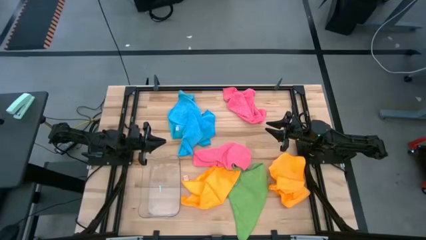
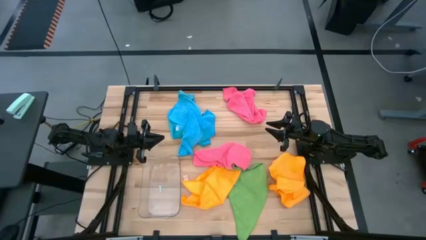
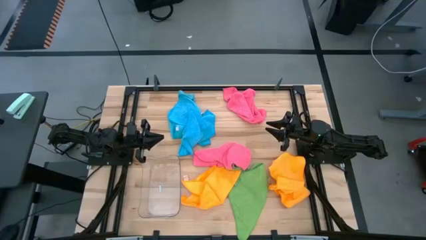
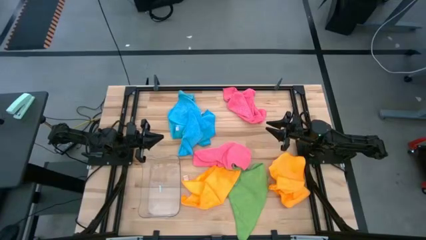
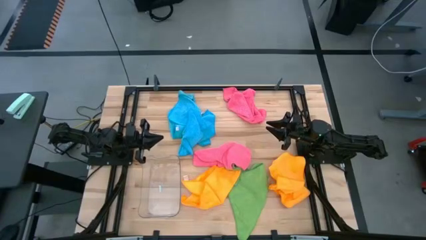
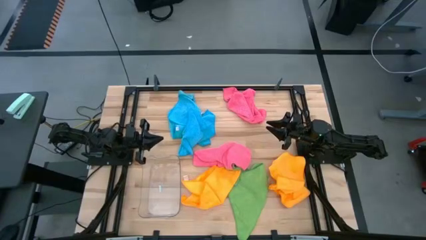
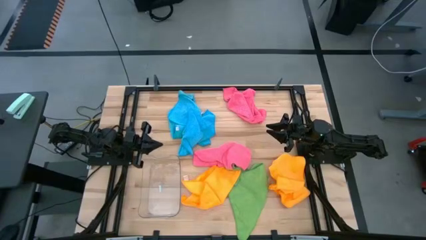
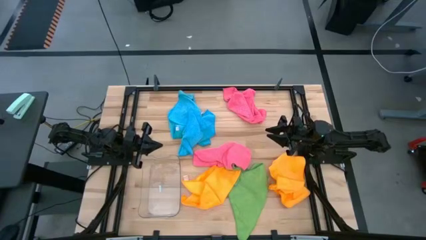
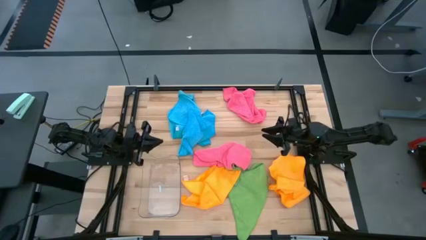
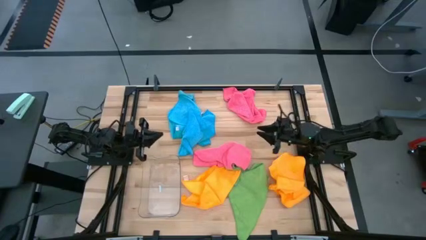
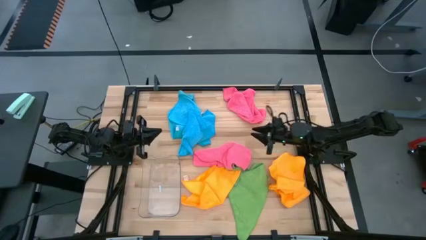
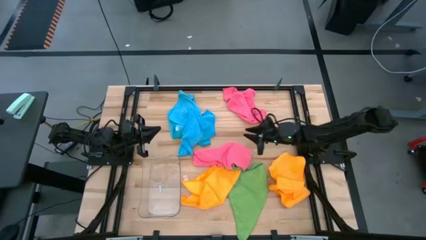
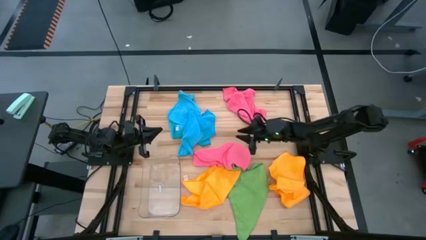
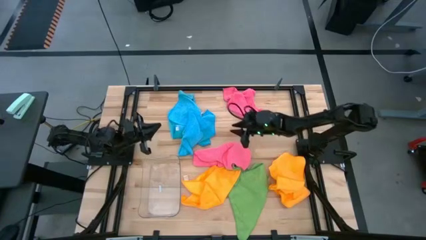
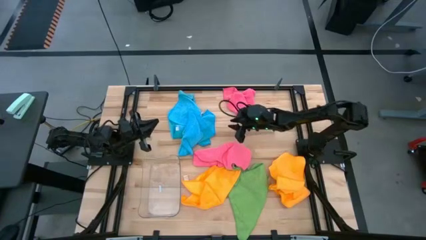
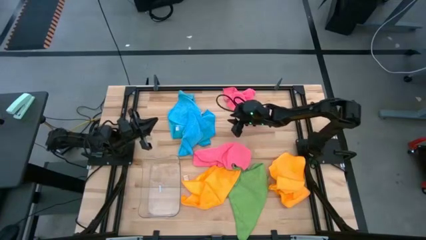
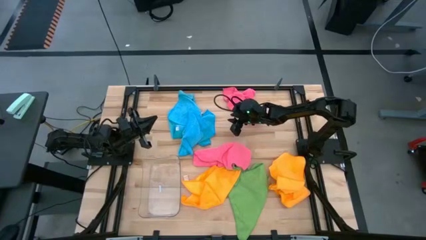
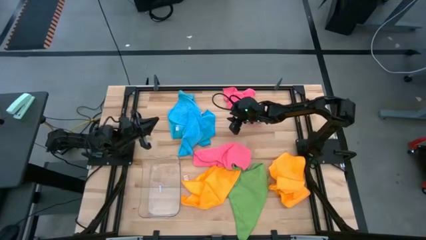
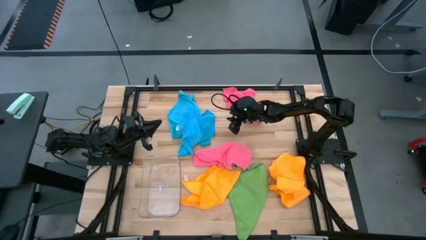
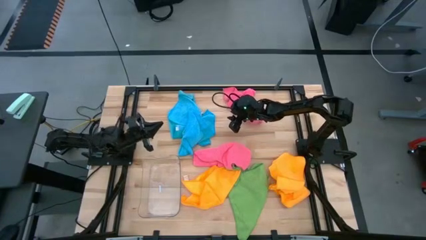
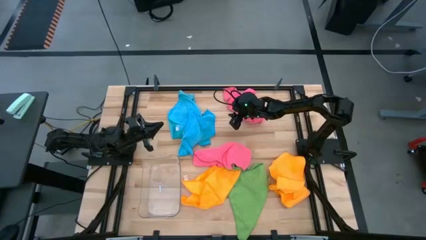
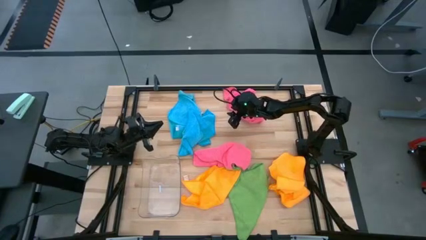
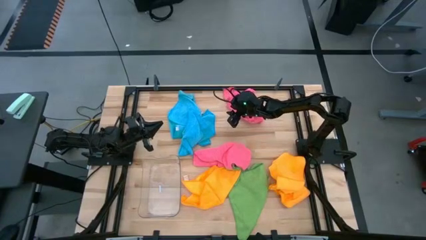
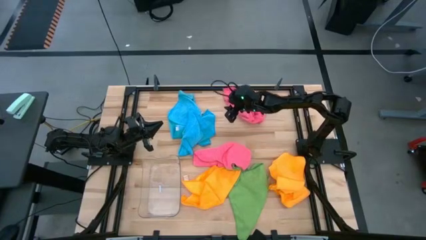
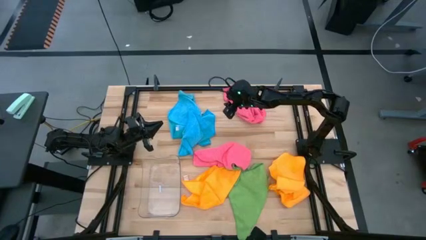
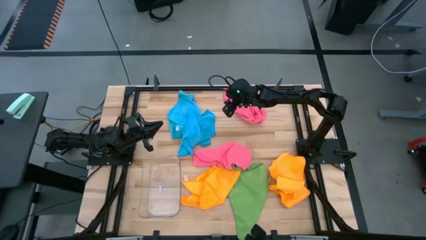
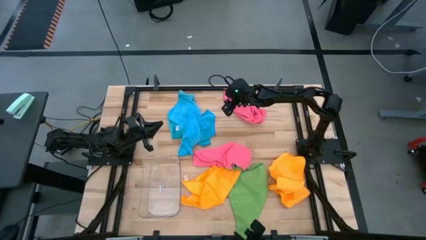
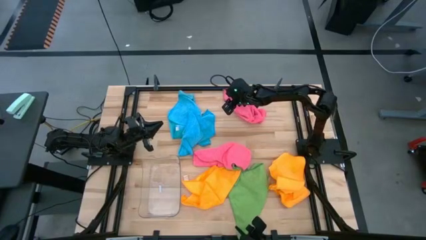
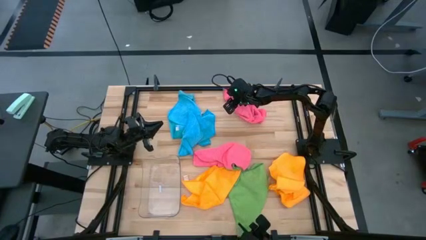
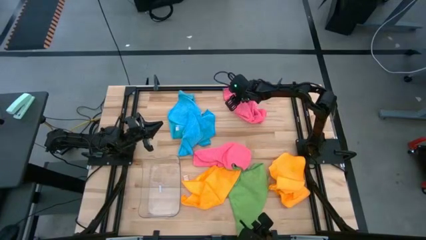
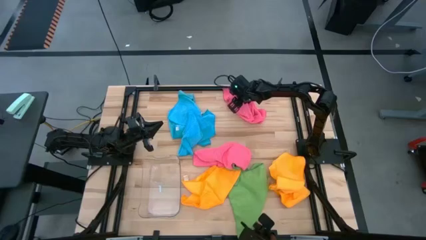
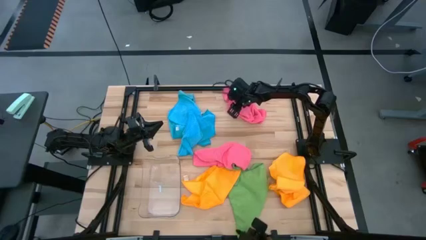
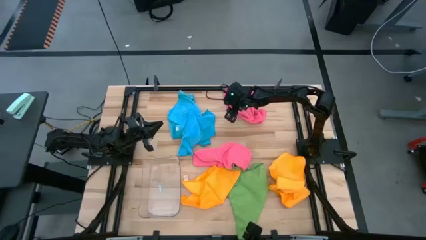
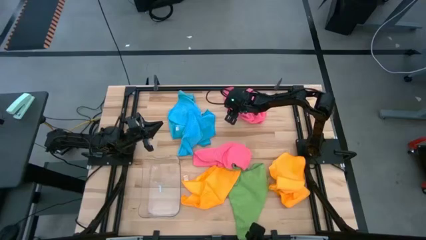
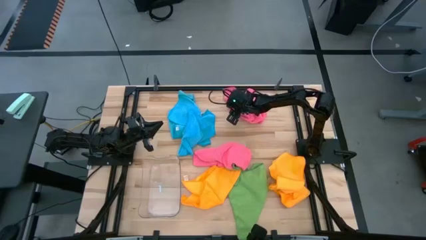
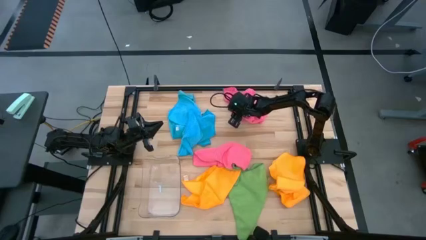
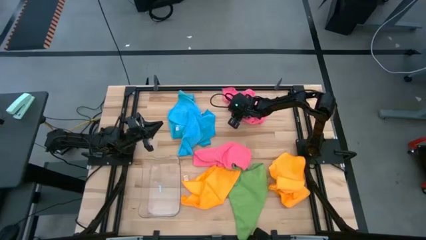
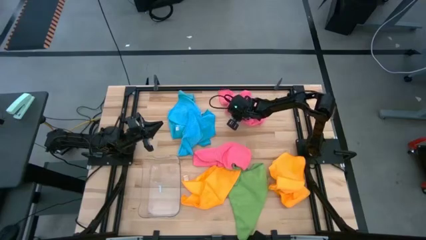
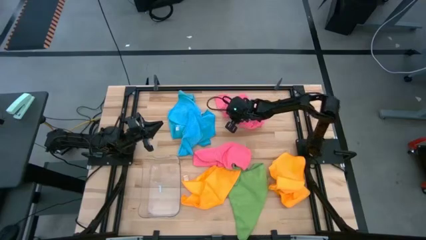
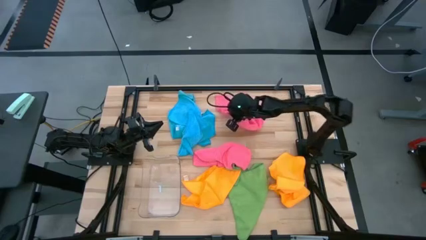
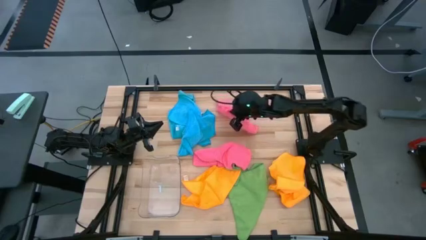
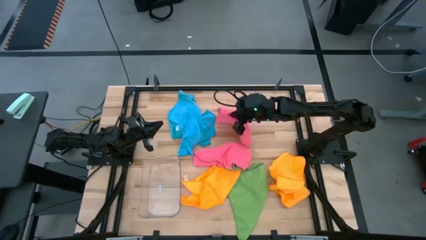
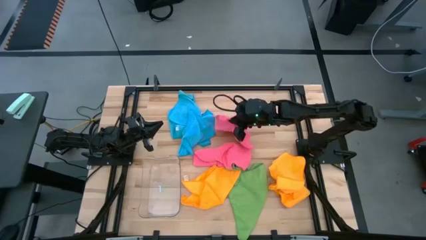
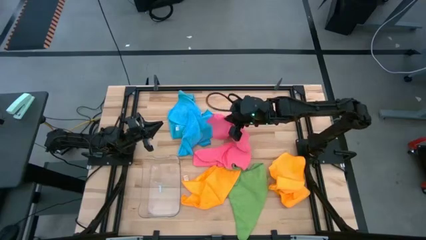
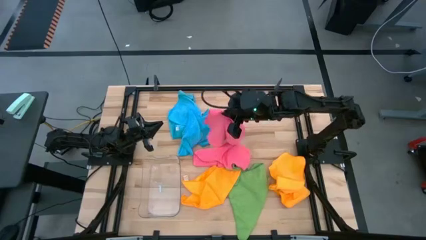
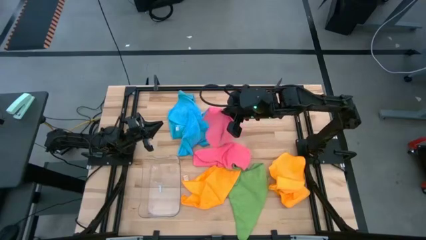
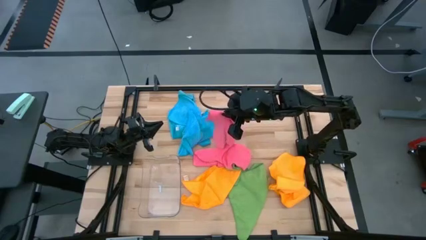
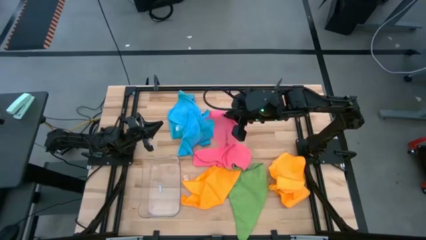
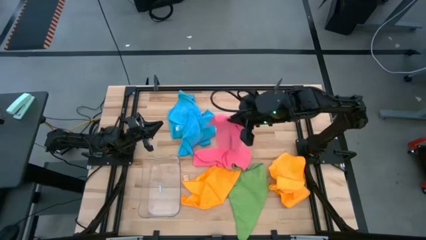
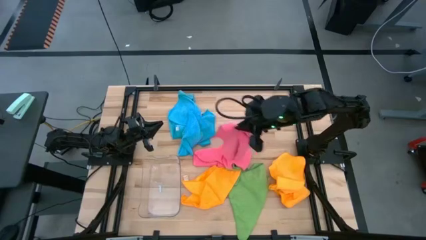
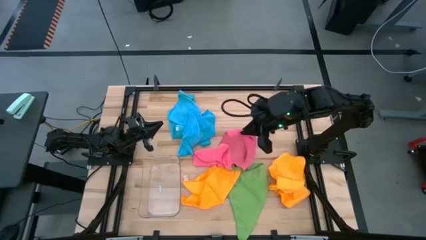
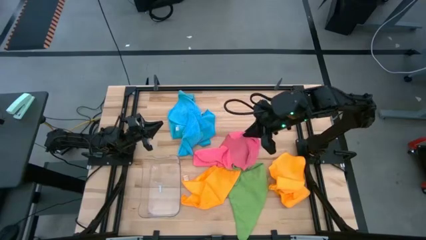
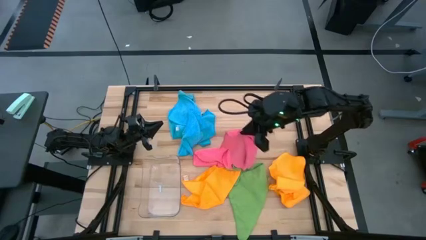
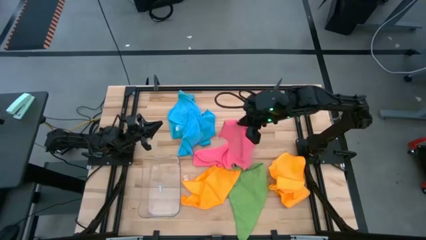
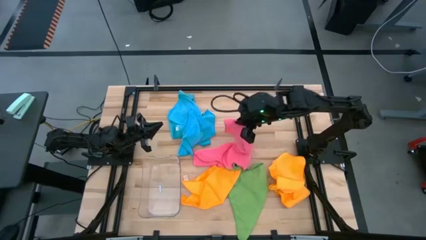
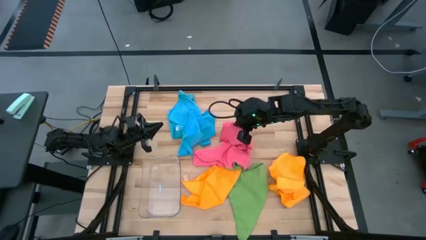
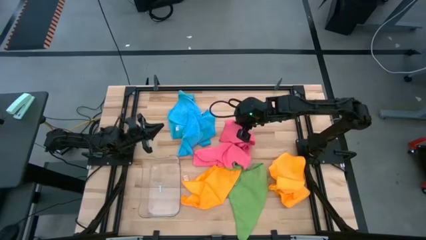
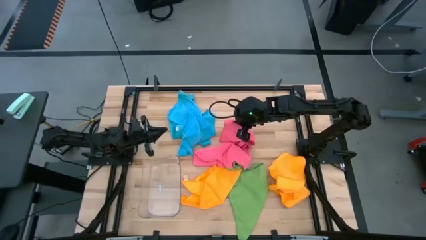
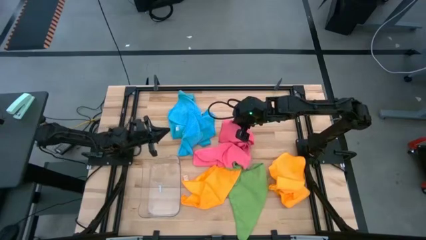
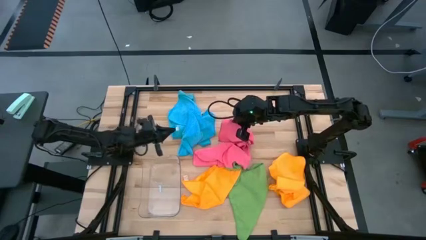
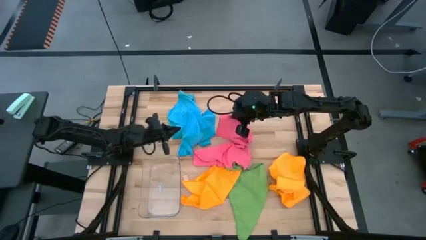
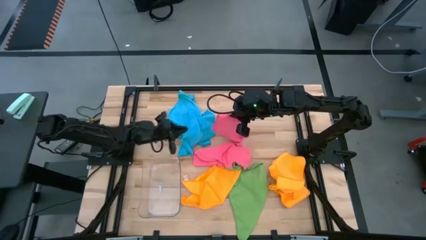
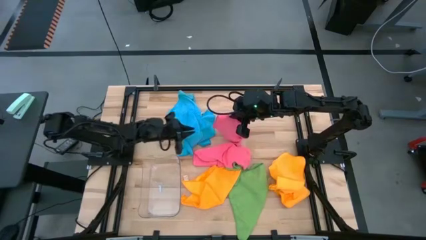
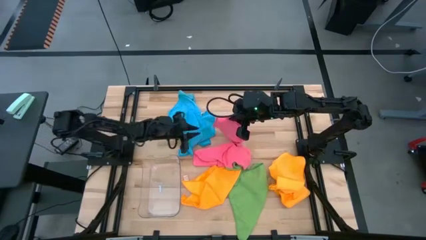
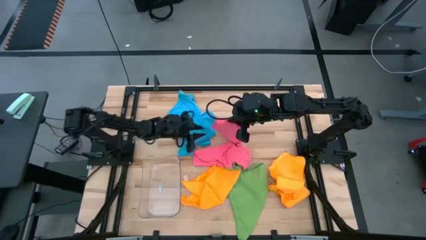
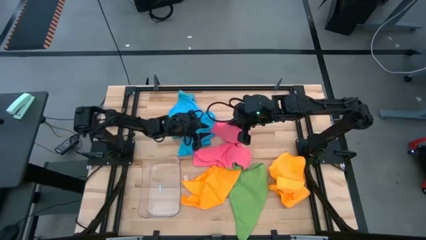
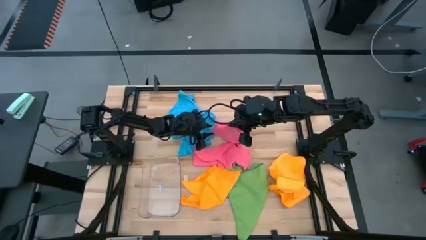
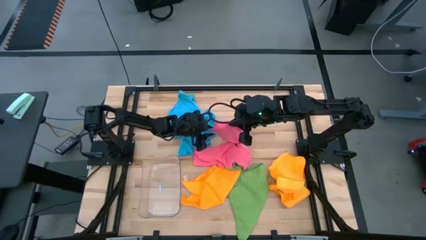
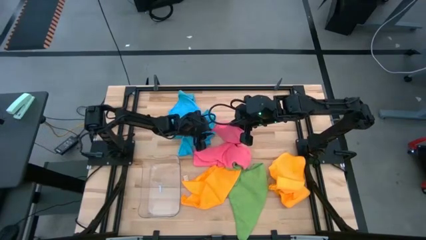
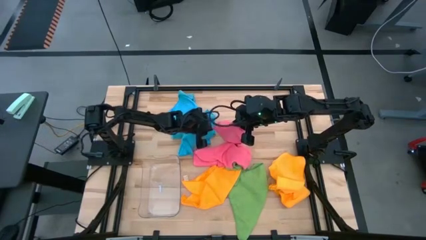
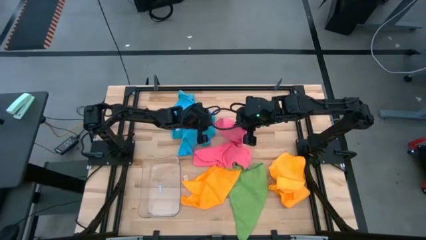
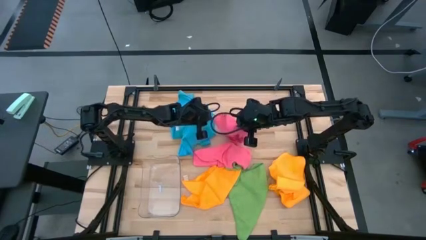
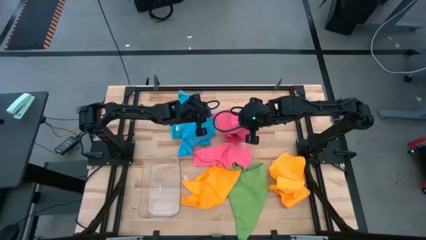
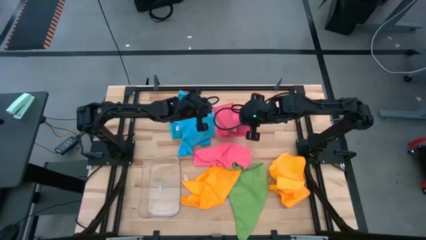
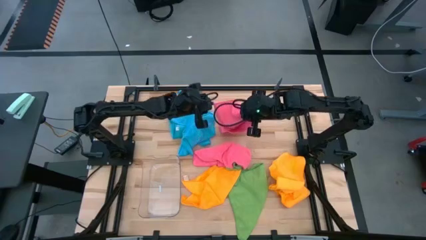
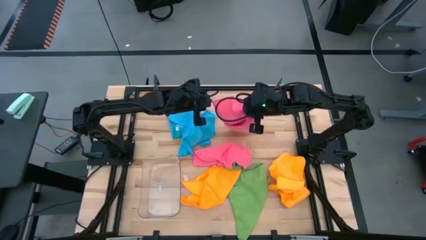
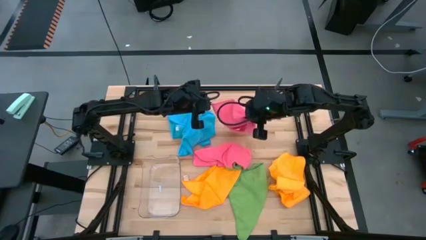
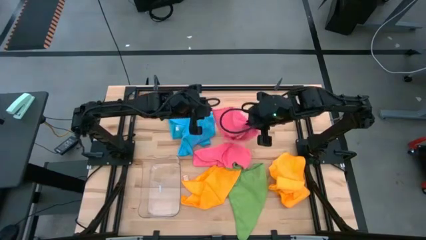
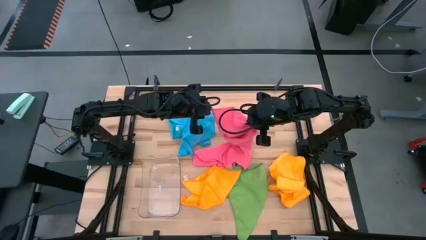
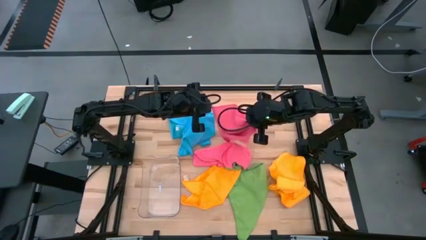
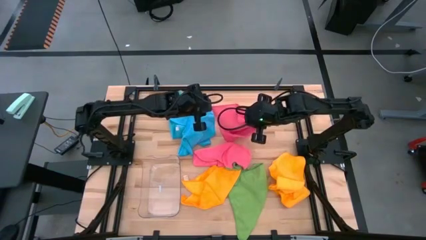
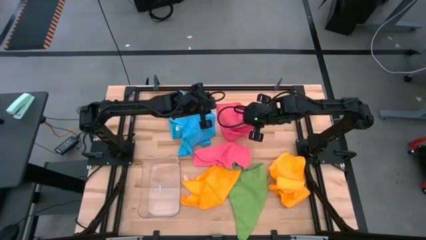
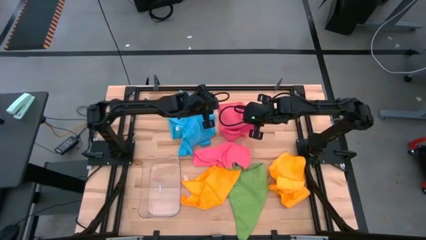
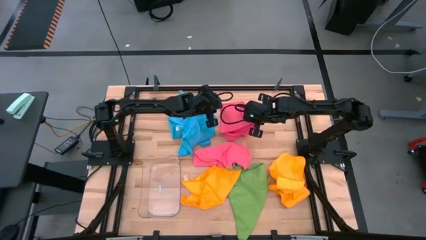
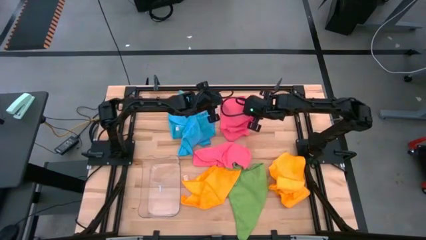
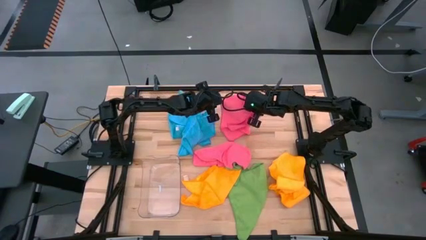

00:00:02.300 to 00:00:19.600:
Task: Fold microfiber towels
Fold the top pink microfiber cloth
